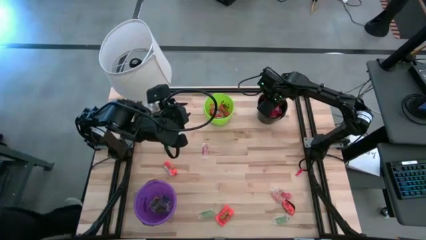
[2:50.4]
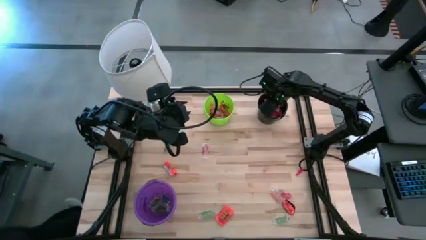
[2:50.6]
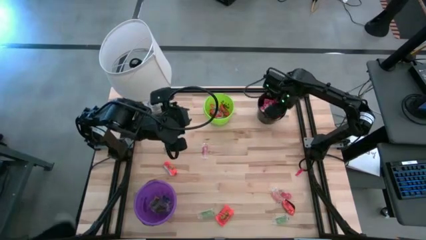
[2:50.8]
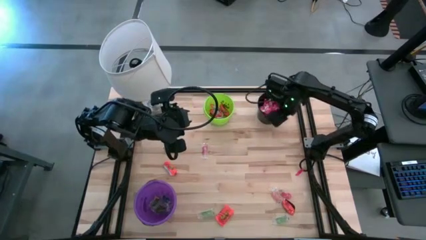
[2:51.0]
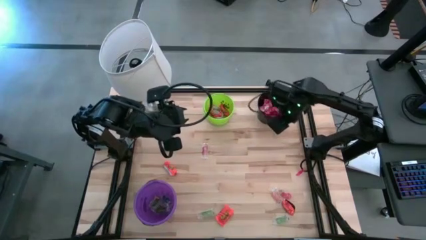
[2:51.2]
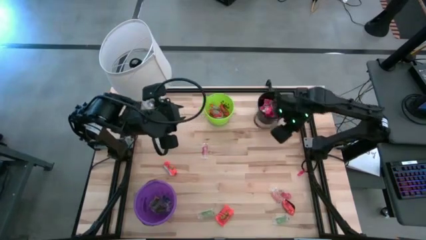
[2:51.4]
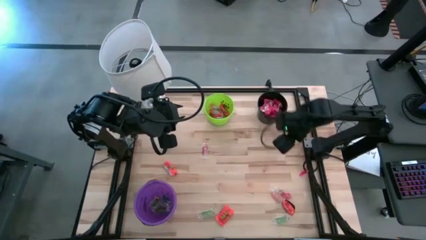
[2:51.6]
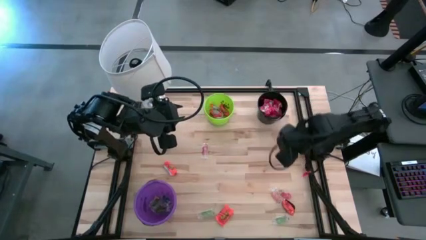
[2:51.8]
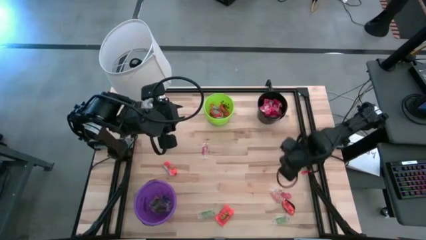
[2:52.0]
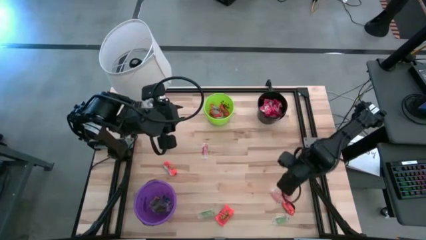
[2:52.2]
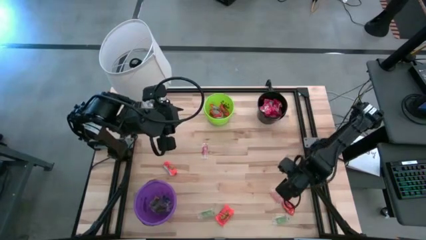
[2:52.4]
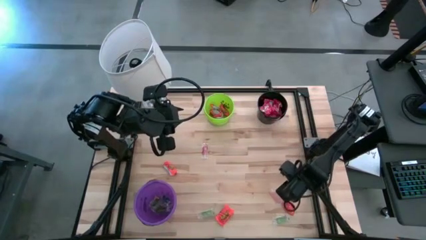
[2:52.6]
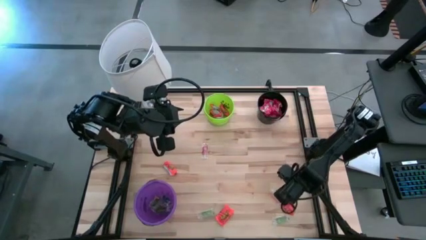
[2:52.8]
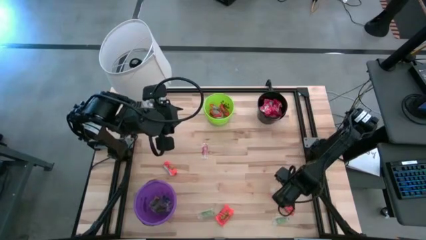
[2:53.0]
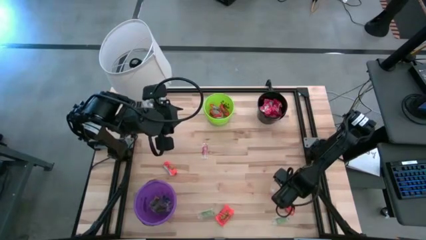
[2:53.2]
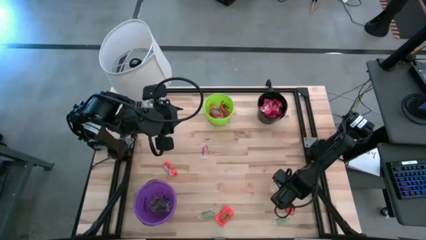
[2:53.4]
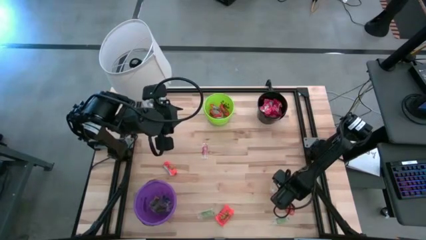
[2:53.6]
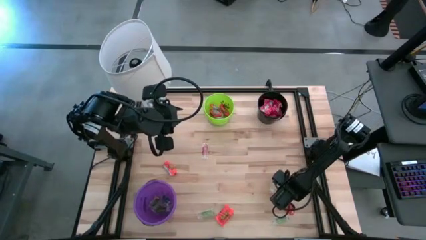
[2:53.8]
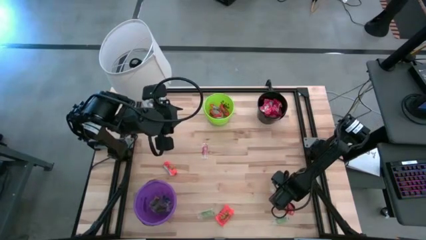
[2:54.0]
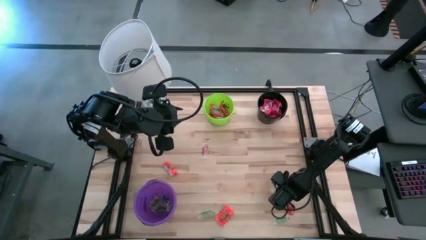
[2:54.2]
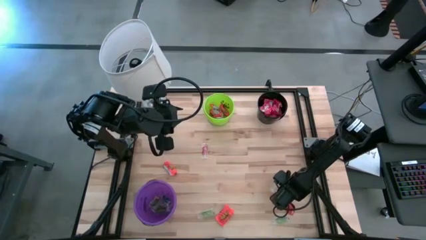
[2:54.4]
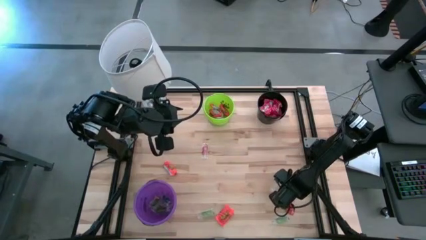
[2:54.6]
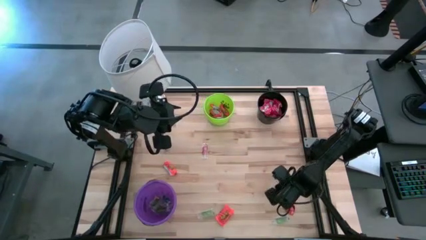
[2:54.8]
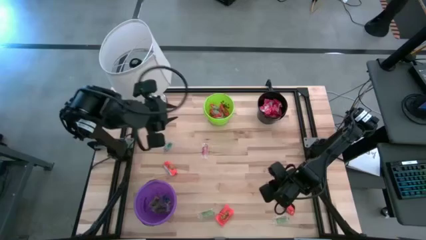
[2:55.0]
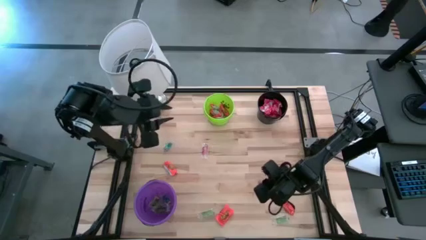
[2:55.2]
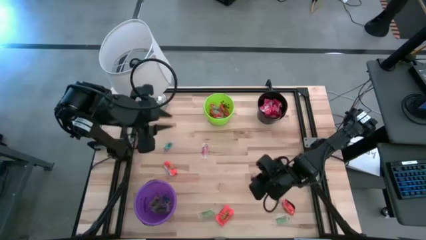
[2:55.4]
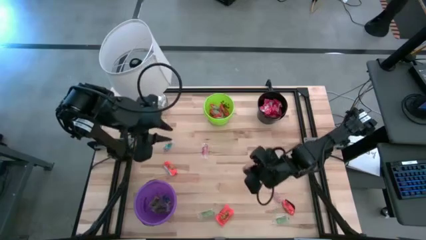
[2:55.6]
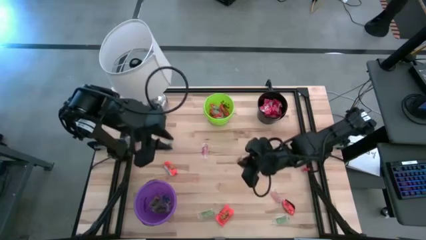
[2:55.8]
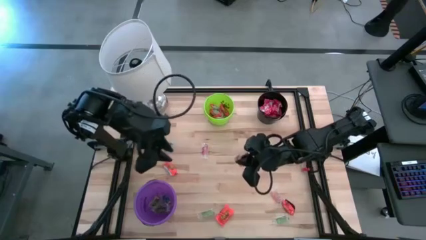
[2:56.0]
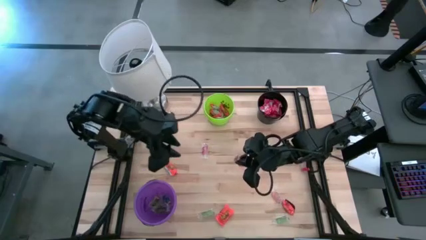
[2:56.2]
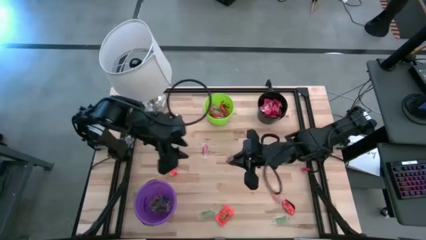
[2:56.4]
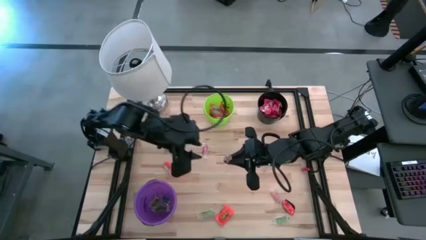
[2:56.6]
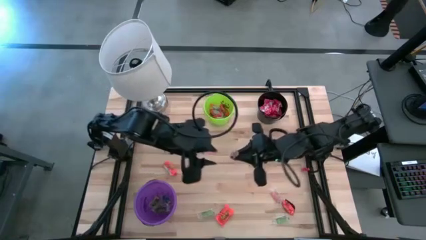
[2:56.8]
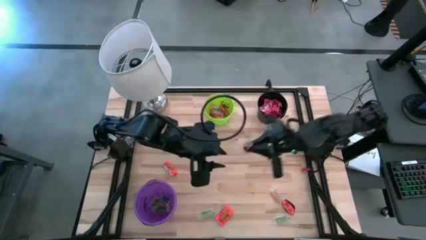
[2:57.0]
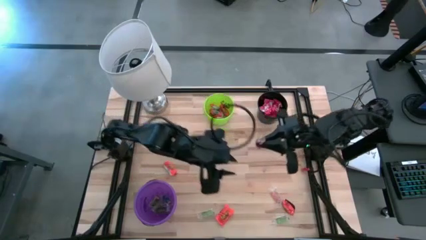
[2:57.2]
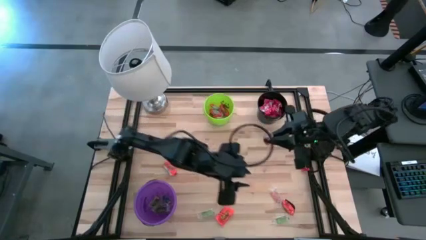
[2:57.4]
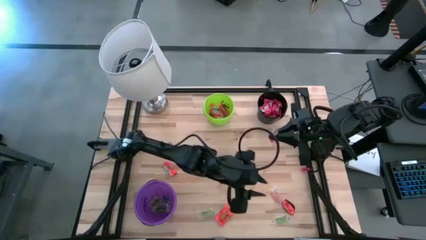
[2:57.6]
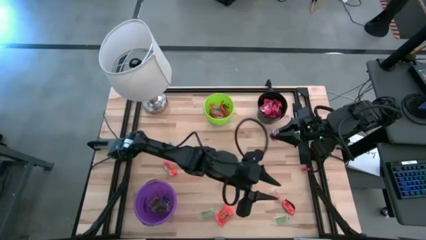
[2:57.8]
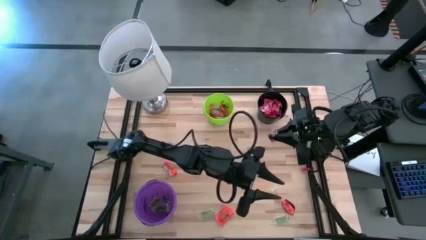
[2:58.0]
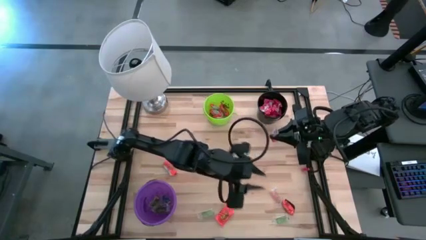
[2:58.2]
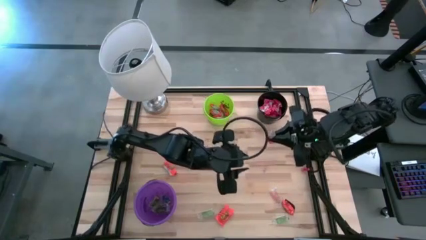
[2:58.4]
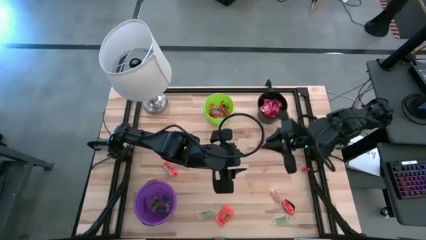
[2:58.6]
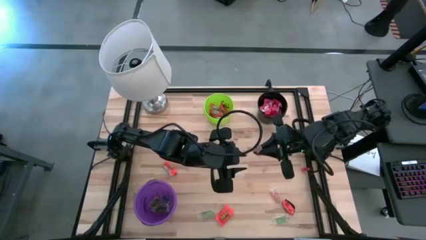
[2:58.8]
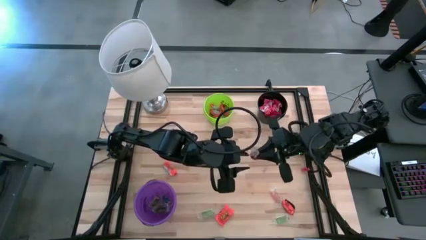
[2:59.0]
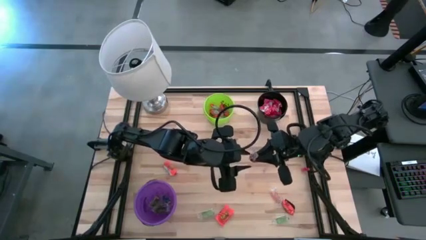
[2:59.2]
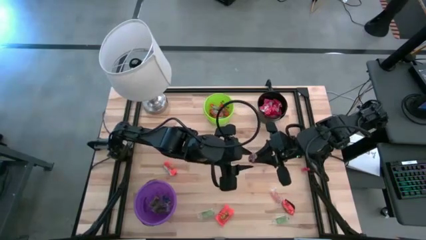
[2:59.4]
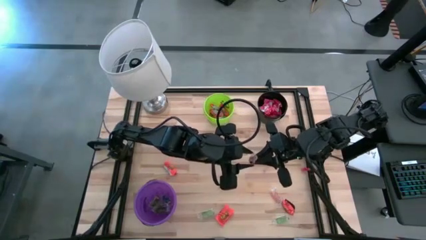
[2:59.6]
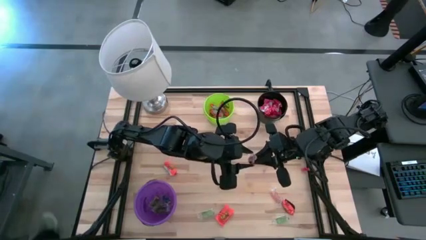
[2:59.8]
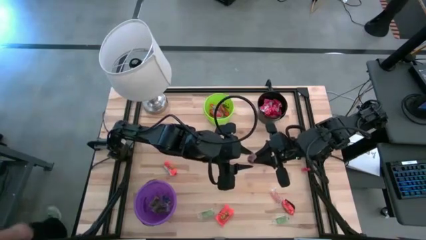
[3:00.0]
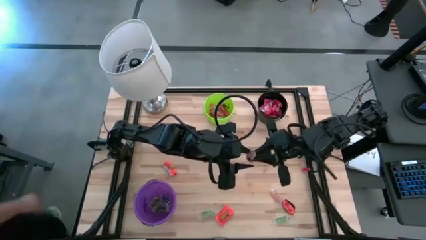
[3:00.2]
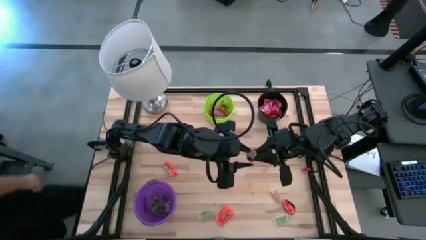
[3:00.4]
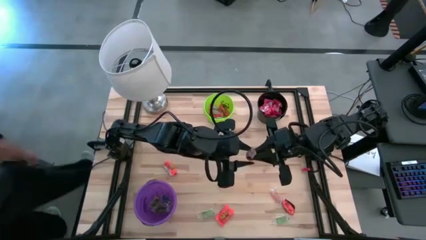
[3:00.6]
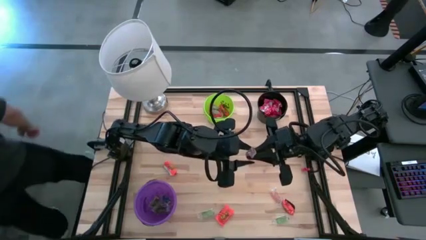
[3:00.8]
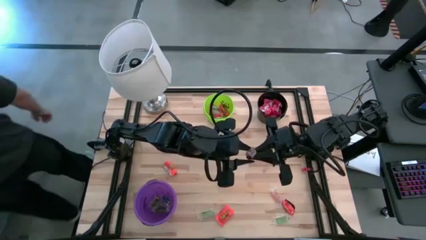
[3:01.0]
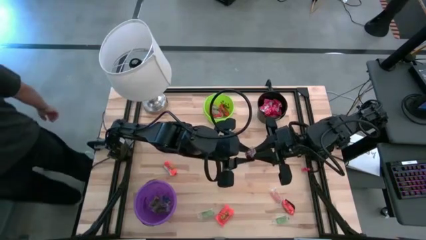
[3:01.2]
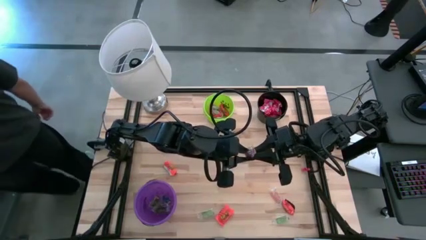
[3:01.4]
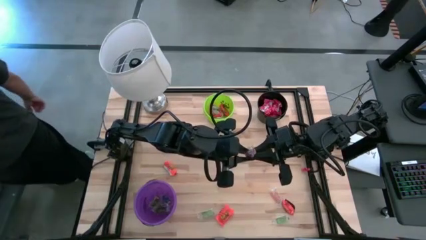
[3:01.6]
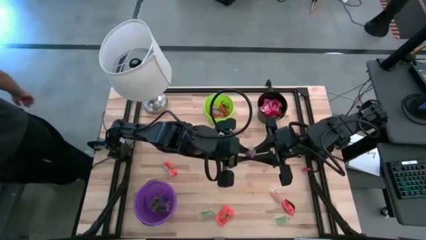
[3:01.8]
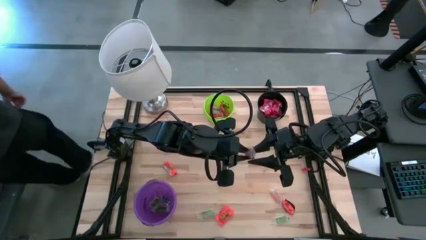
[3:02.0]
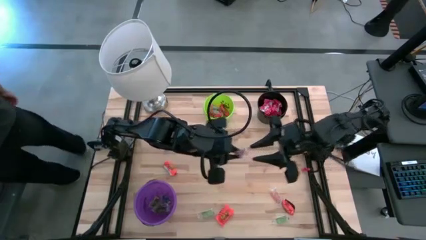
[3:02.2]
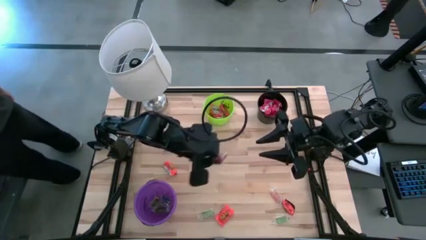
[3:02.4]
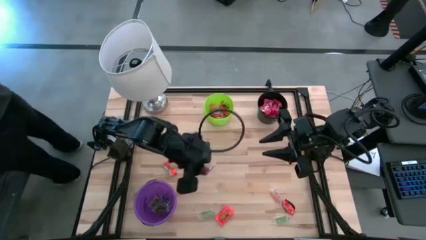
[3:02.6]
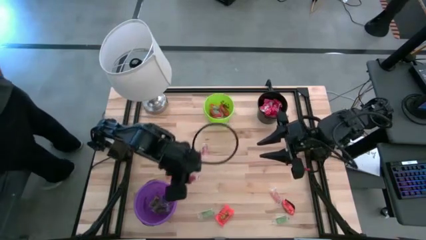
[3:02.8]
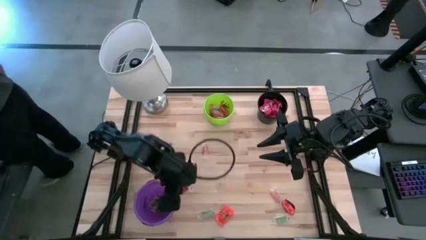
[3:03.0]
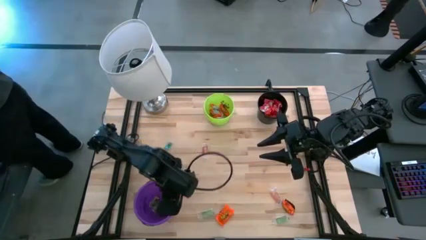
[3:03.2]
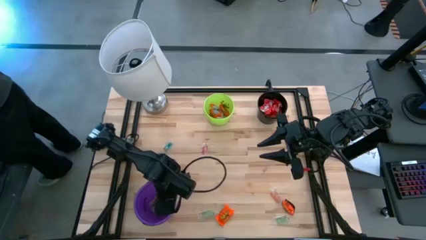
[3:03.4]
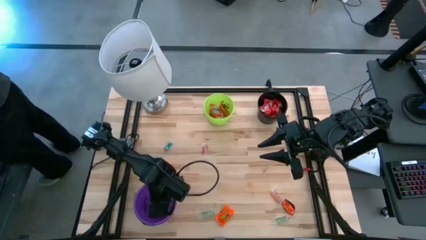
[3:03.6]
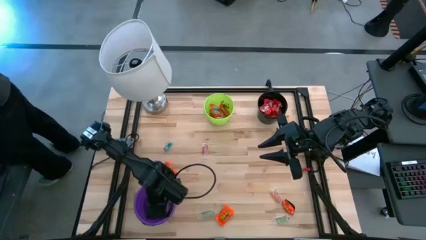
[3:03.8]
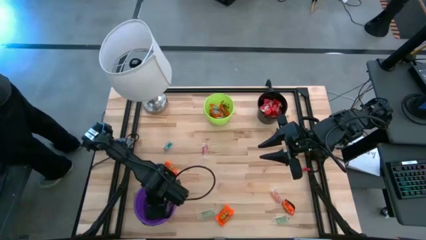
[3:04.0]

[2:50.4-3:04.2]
Task: Sort candy
Put the orange gummy into the violet bucket

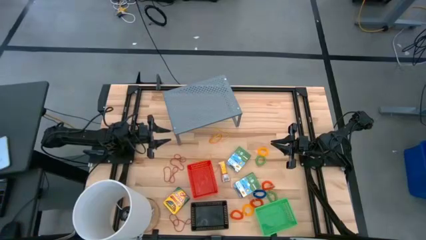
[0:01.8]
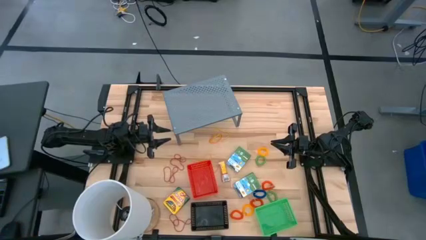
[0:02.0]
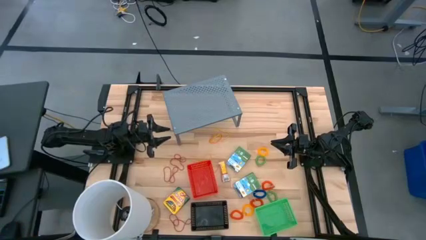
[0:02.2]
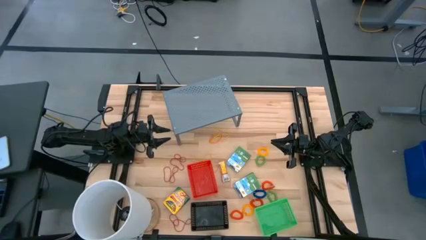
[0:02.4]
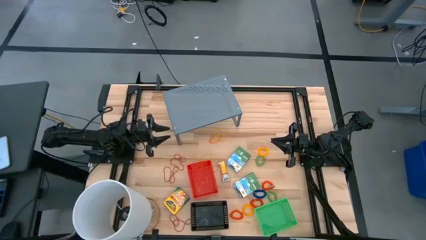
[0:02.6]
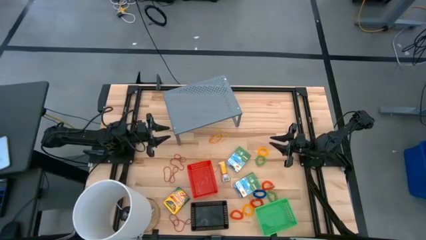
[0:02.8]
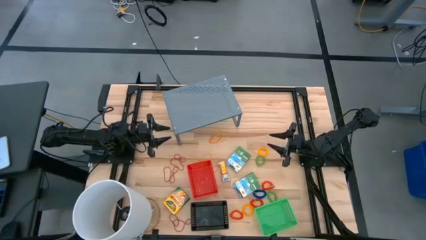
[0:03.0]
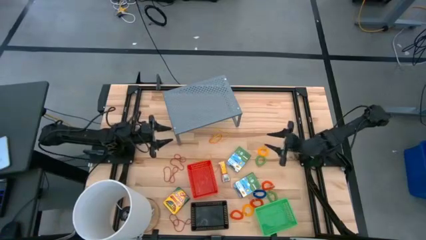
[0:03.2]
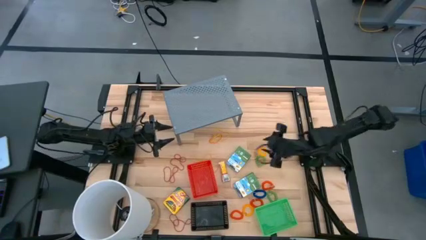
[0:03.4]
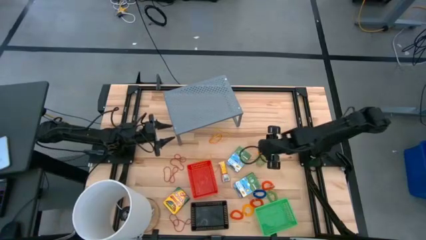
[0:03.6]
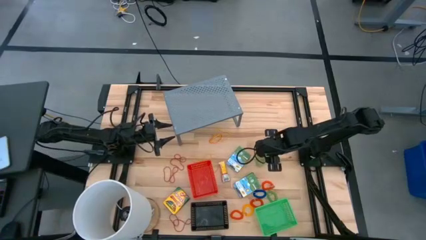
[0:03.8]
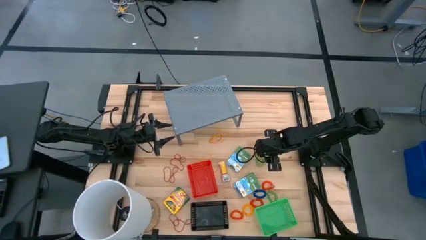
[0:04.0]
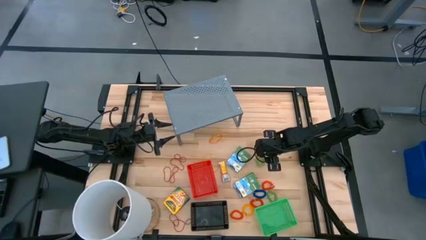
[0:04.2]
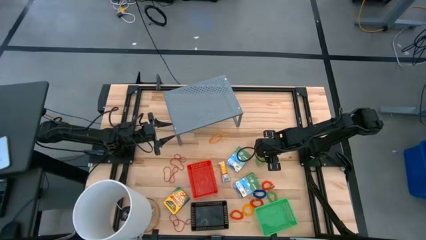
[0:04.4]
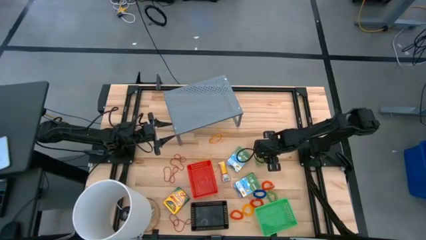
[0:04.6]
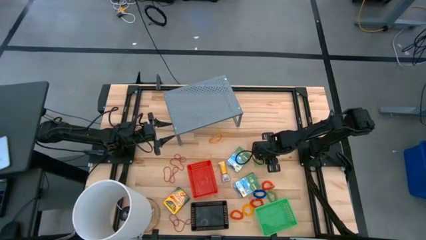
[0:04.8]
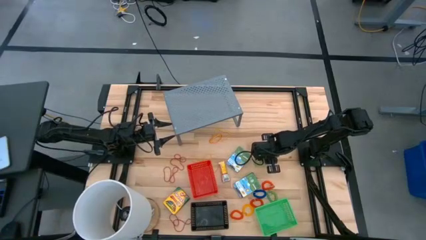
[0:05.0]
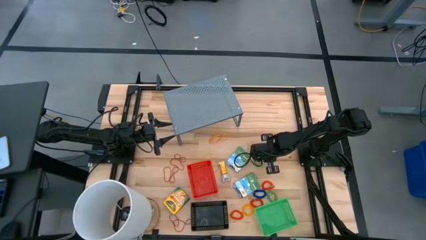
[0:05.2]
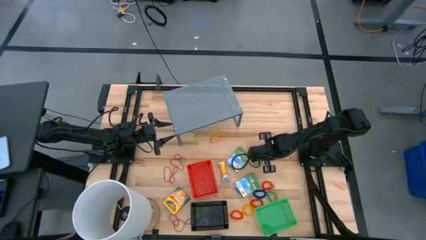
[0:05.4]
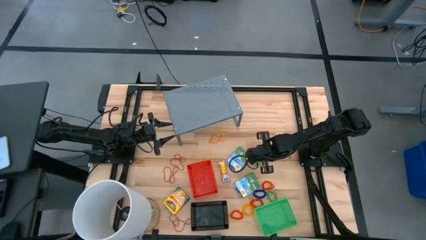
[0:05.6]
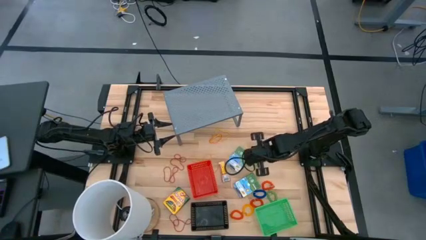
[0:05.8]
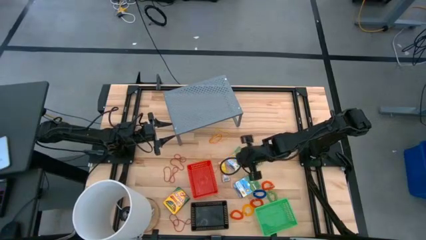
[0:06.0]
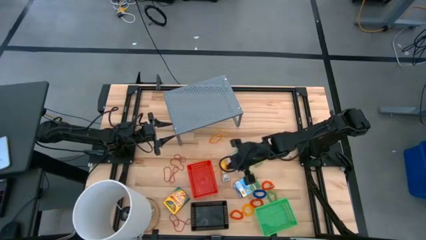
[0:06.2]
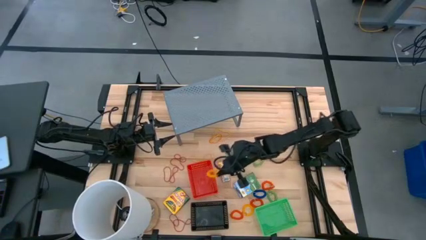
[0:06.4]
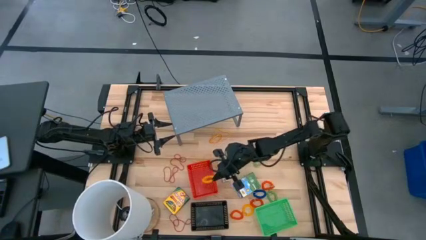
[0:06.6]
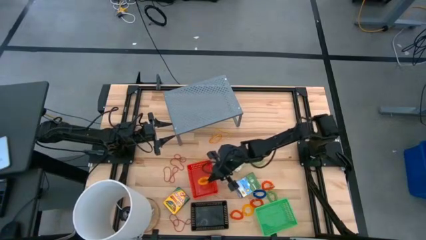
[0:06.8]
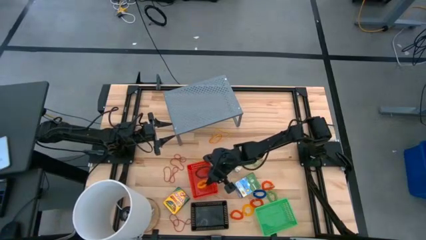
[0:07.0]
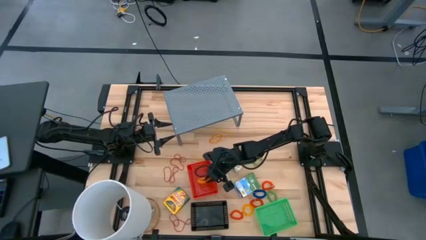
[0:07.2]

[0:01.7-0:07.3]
Task: Pick & Place Office Desk Supplies
Put the top yellow spring keychain into the red bin
